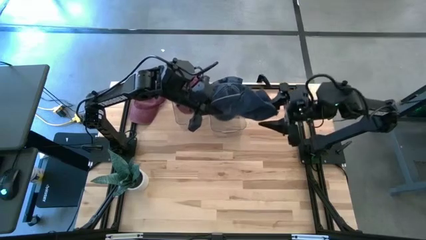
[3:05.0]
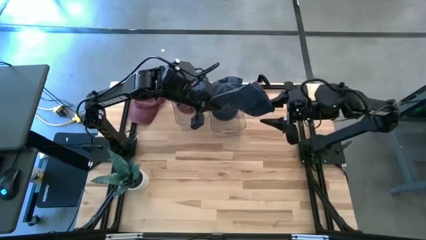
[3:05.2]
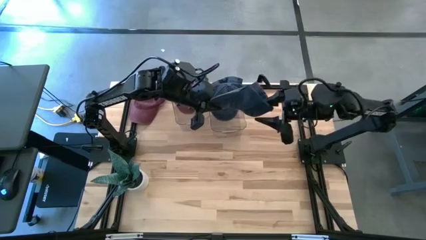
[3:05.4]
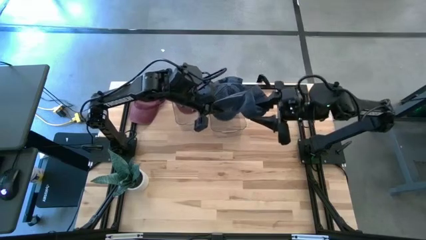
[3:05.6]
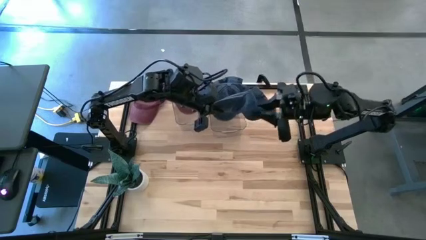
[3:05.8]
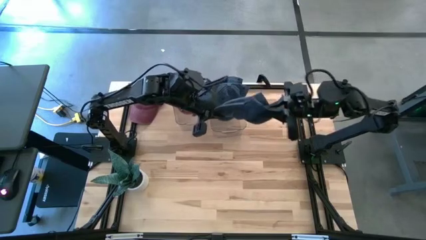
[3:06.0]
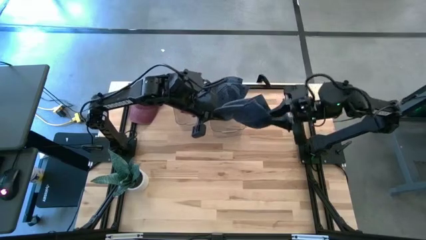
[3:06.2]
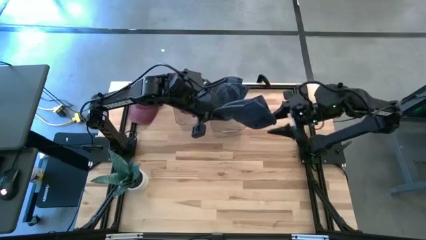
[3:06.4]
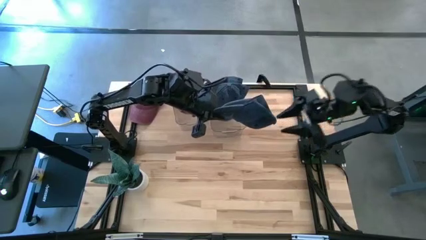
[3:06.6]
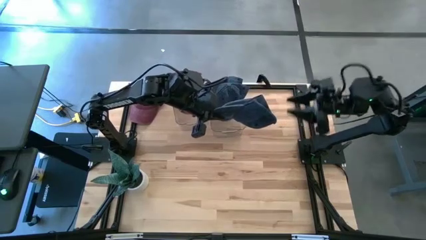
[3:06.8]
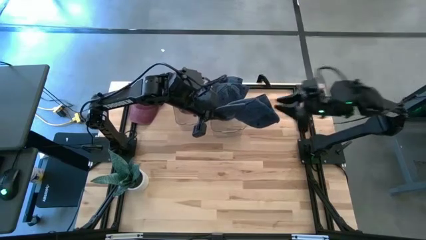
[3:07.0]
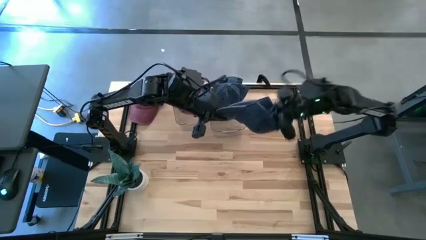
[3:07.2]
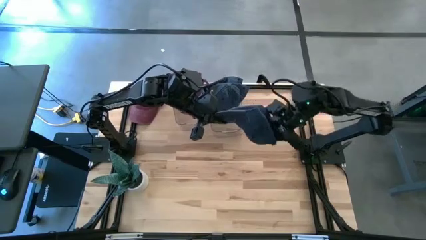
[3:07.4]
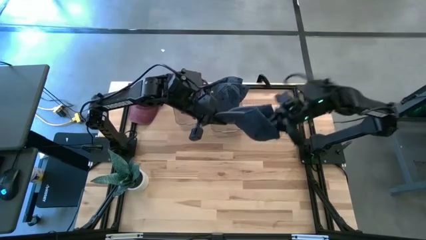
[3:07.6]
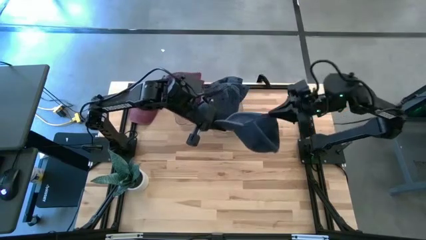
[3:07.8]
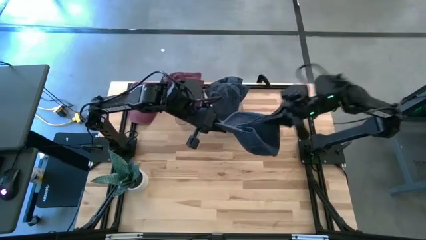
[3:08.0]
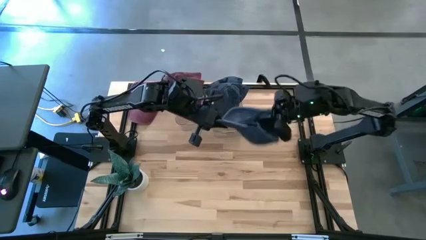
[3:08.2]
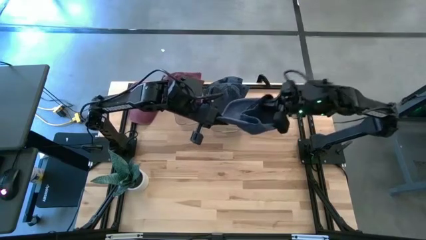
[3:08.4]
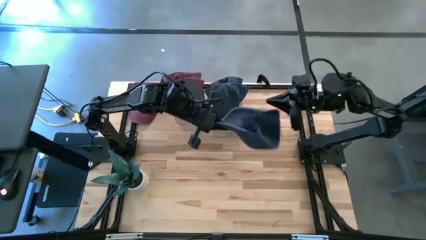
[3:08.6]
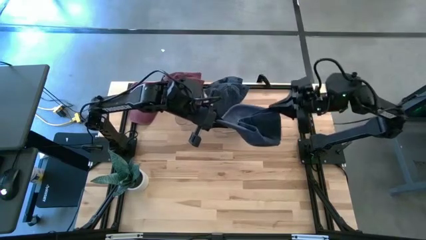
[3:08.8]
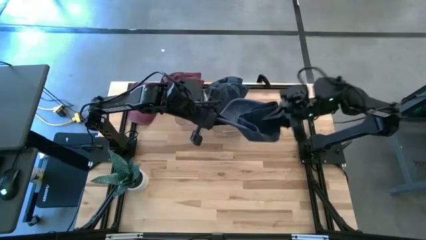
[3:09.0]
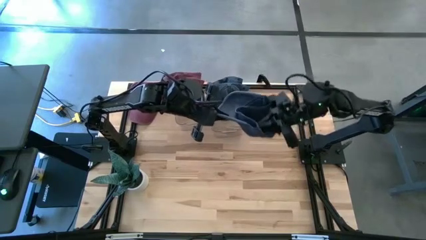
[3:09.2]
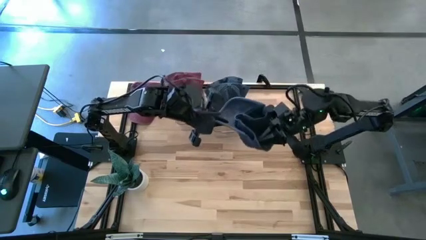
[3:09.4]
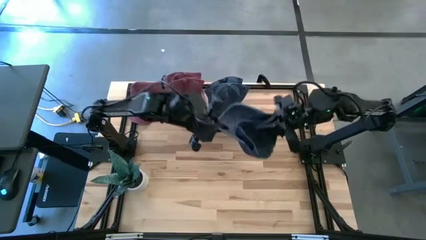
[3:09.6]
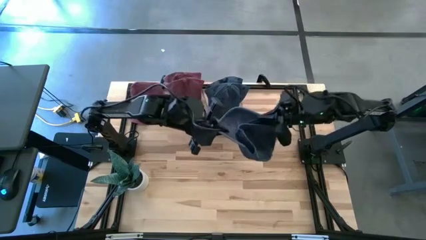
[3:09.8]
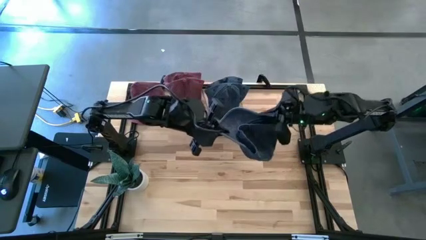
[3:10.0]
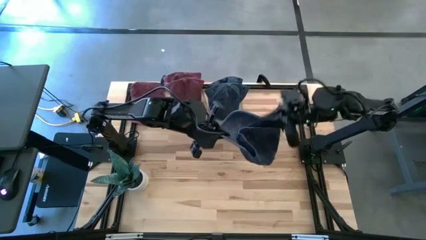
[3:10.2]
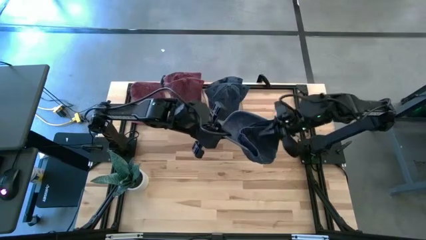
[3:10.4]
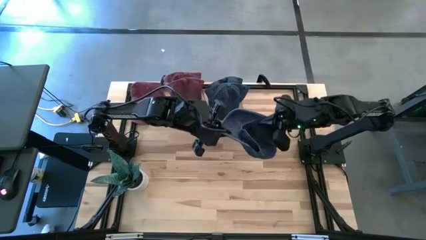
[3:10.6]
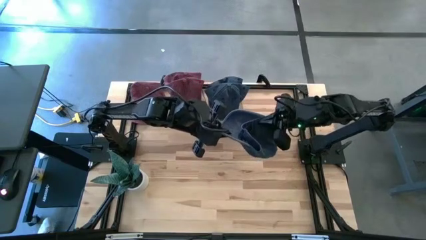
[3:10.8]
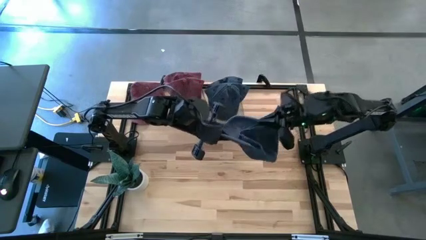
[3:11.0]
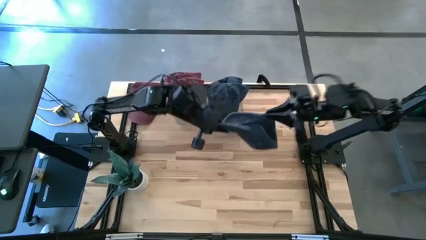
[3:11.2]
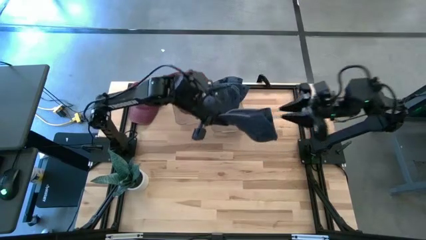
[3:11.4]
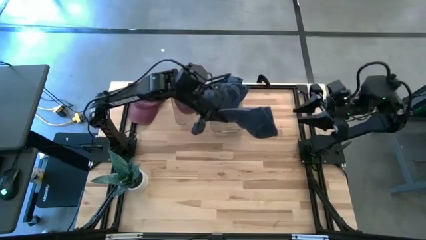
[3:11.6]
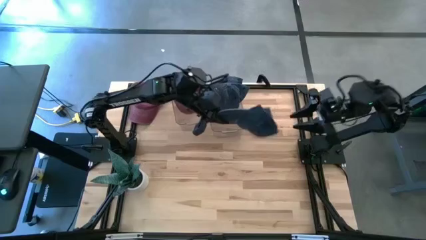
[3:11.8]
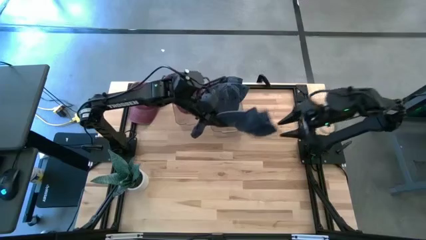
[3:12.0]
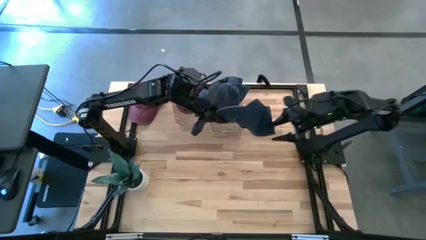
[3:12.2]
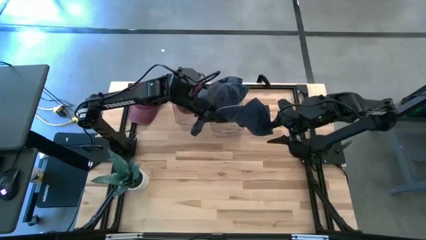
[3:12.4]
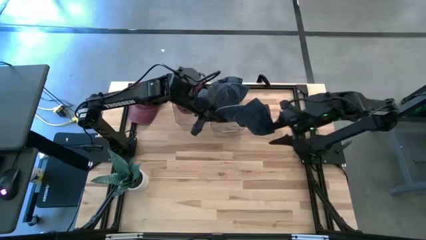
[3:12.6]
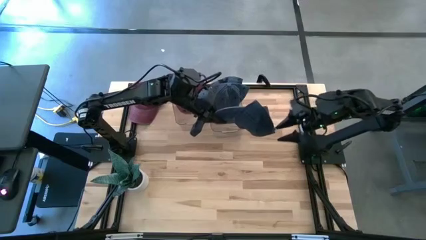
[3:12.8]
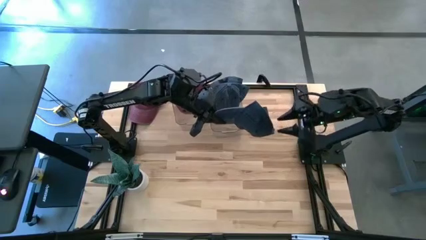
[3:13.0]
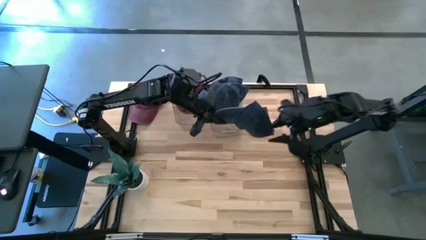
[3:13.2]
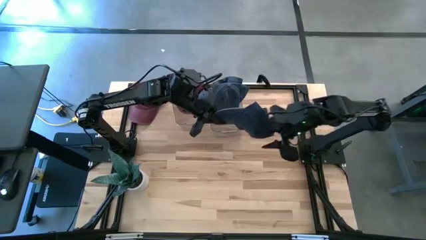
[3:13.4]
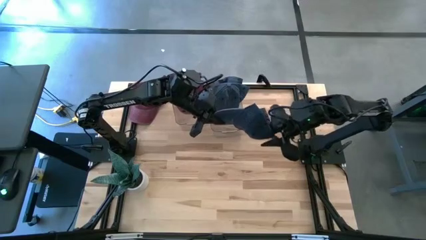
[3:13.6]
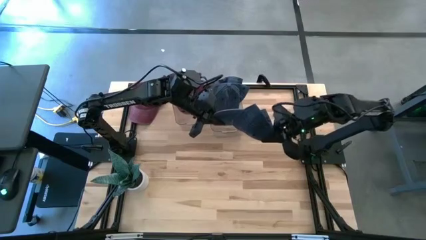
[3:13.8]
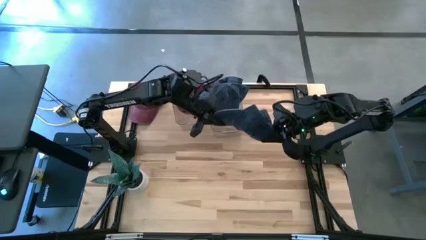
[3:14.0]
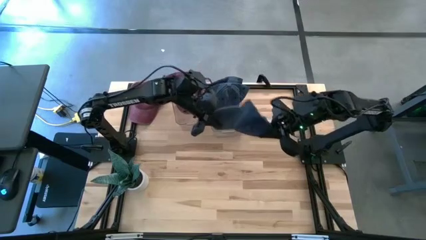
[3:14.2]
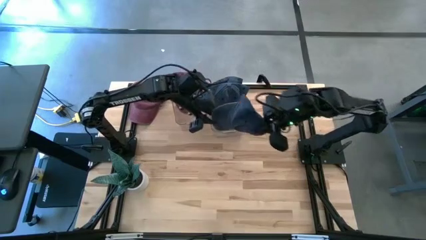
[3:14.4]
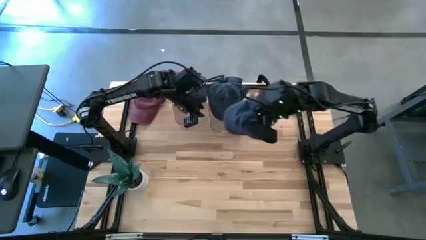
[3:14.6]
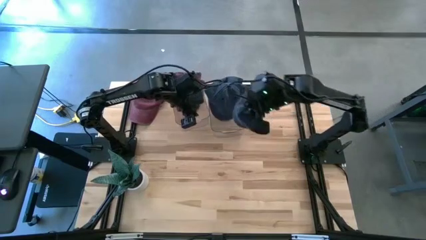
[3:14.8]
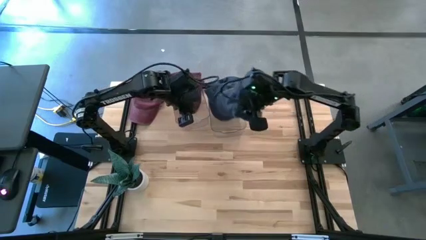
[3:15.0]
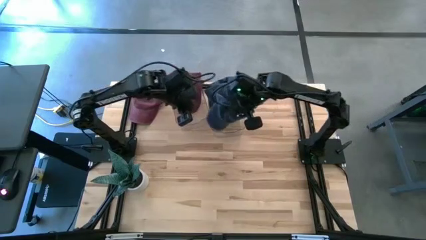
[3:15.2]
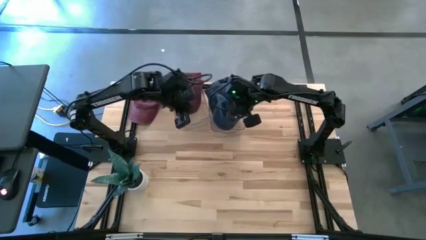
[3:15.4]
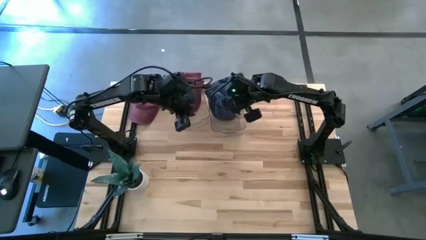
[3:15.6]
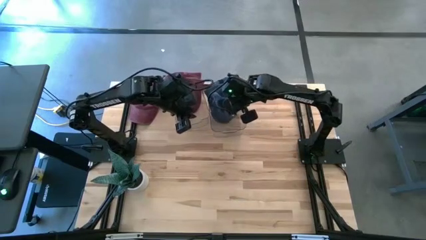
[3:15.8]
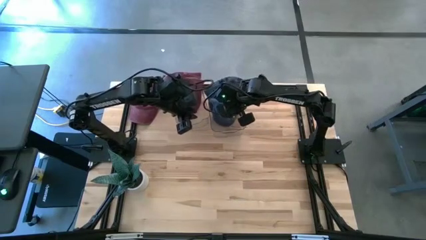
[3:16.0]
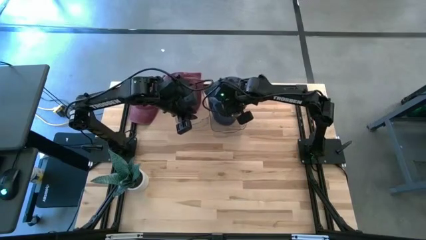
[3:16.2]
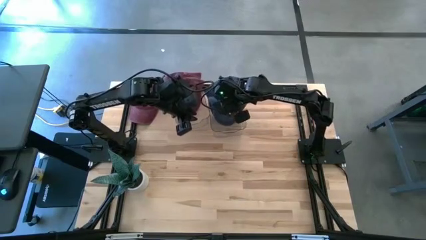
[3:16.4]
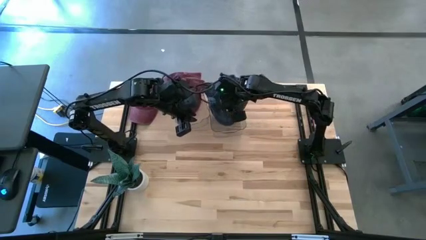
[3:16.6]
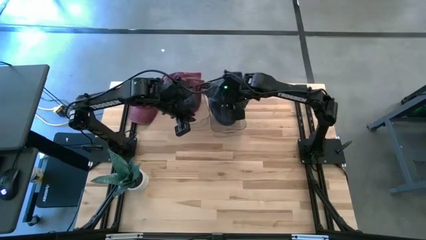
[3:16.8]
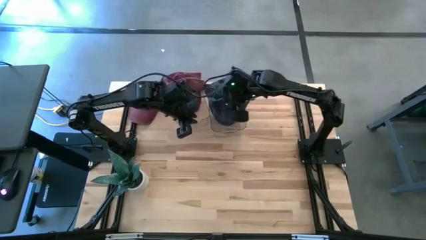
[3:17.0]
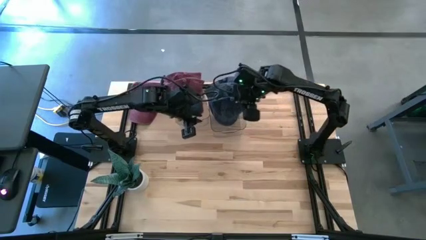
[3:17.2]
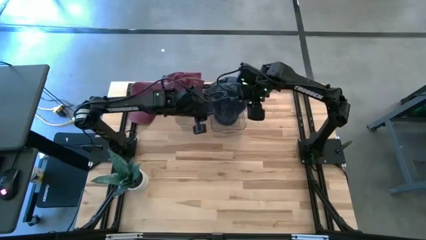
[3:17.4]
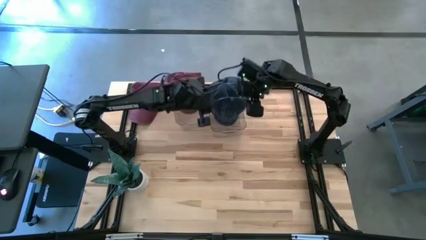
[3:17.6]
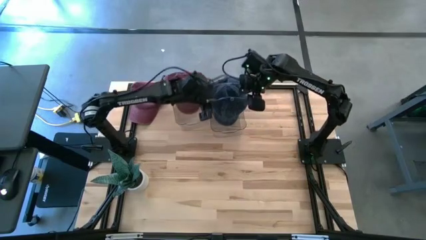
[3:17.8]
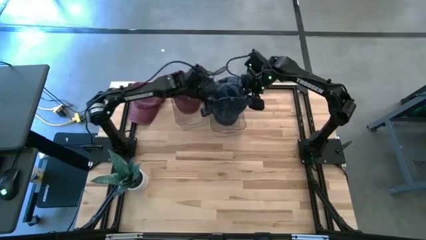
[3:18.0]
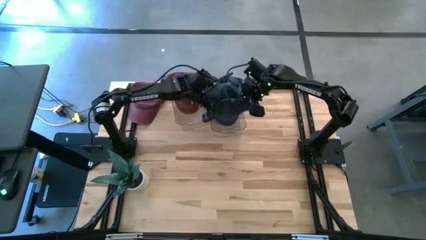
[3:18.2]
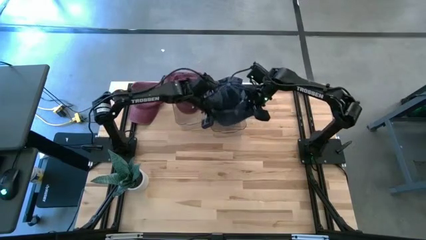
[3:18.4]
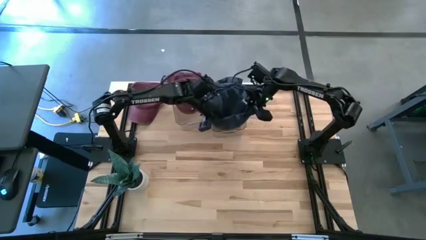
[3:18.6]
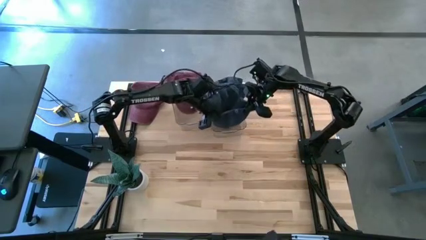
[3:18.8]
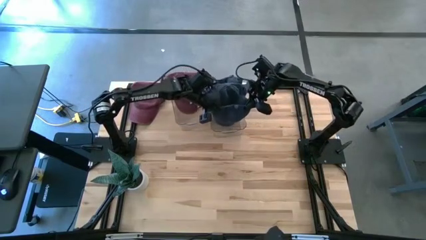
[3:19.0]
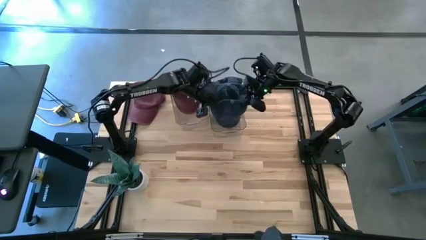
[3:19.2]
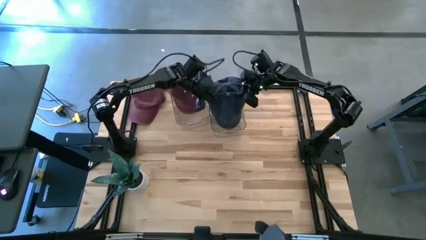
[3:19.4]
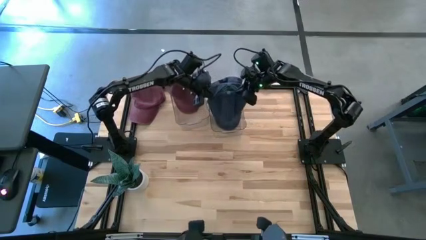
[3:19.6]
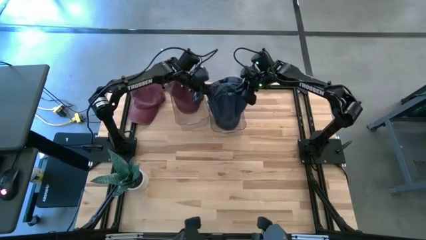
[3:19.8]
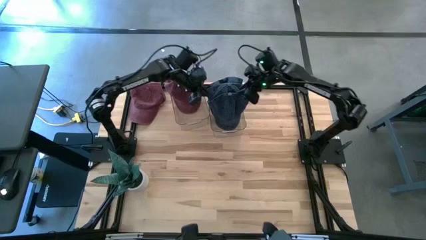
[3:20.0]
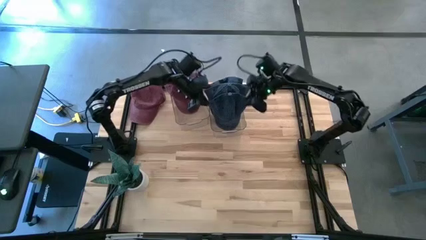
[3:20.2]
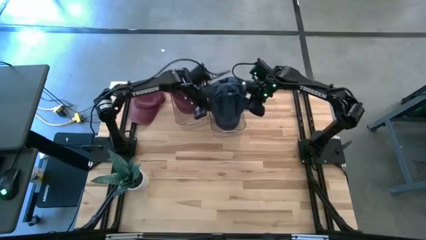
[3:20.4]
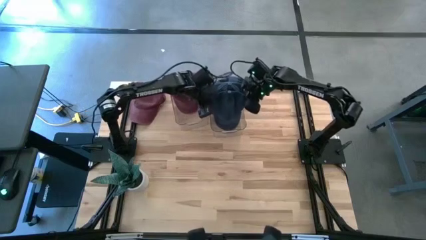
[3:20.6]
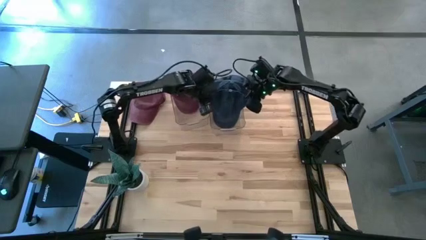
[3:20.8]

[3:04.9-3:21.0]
Task: Pick & Place hat
Put the blue cap into the right bin
